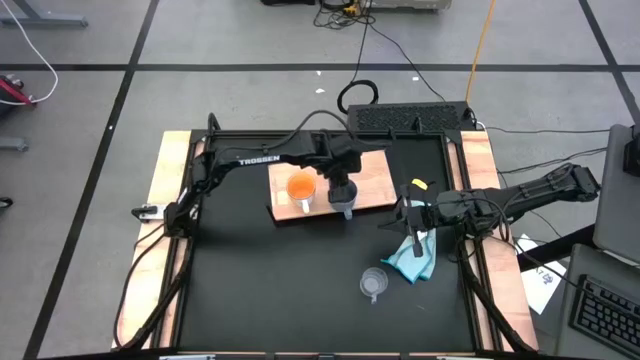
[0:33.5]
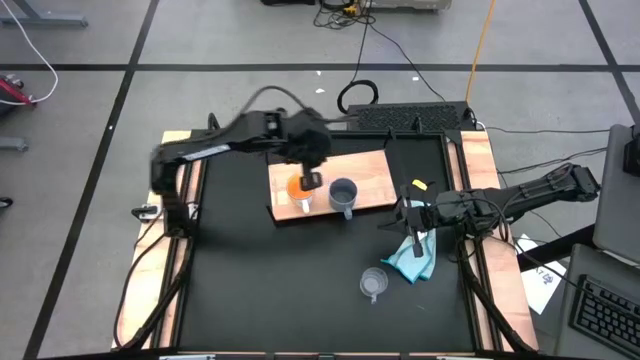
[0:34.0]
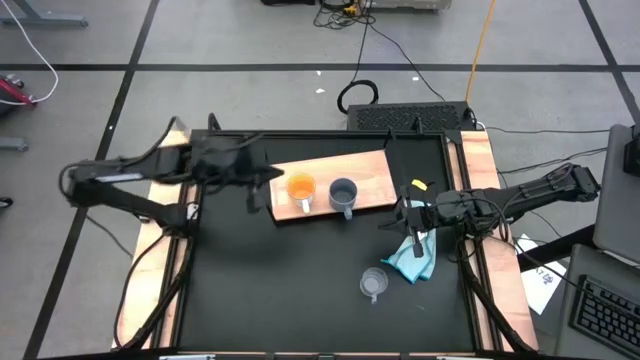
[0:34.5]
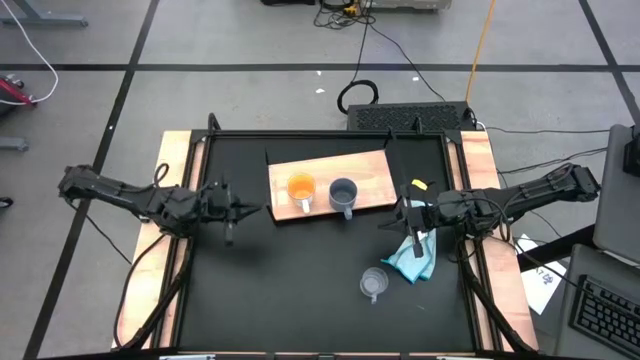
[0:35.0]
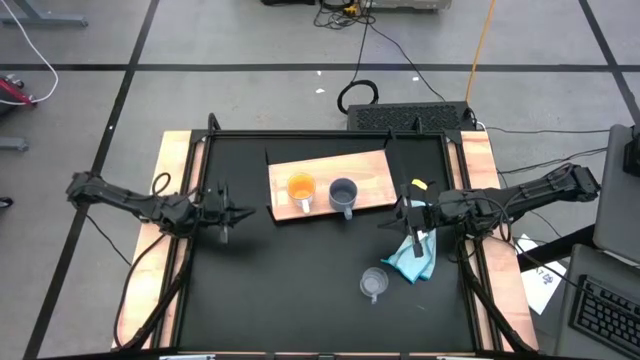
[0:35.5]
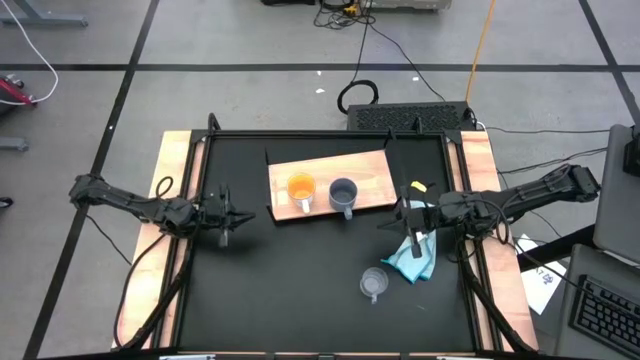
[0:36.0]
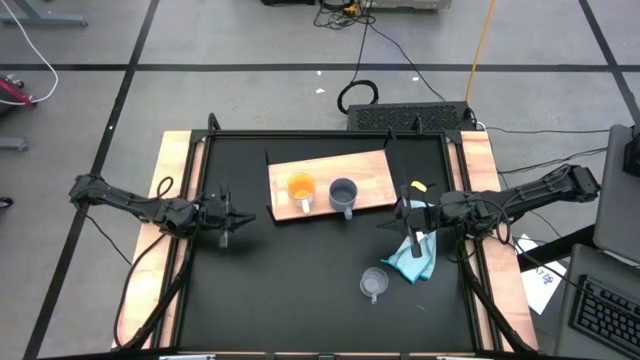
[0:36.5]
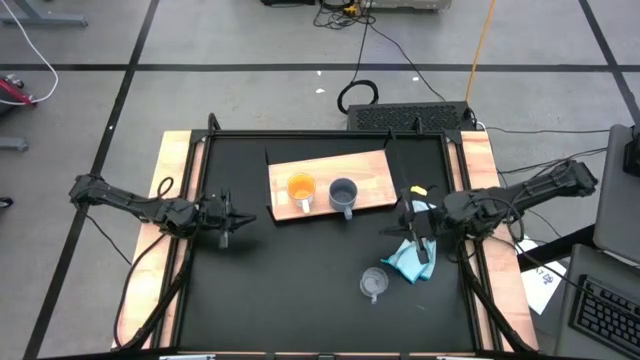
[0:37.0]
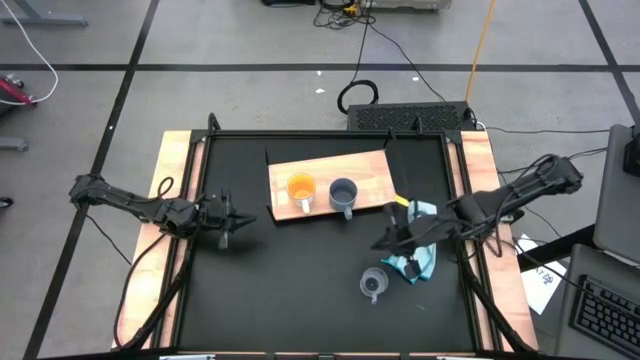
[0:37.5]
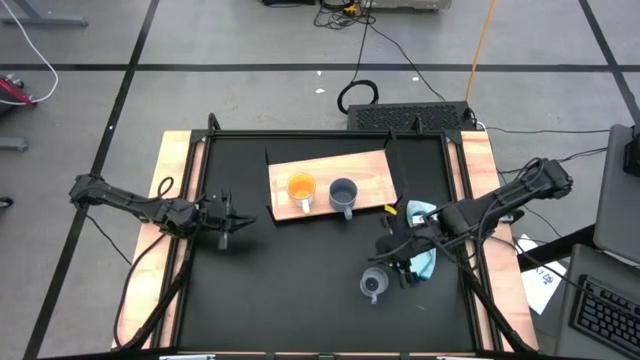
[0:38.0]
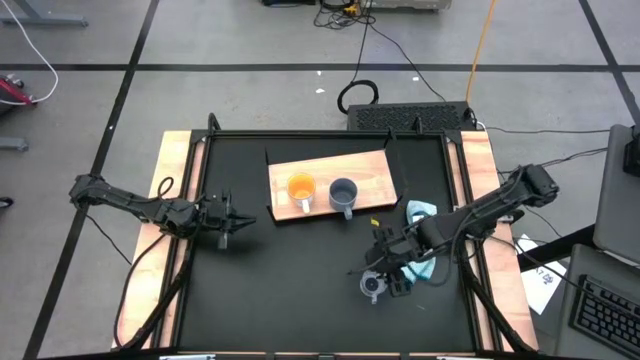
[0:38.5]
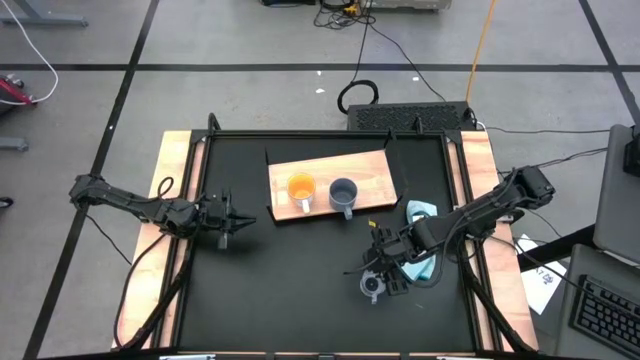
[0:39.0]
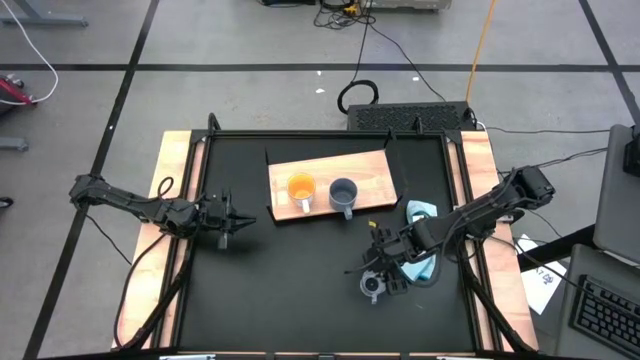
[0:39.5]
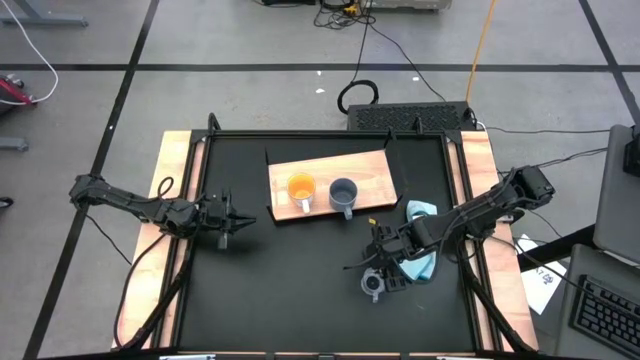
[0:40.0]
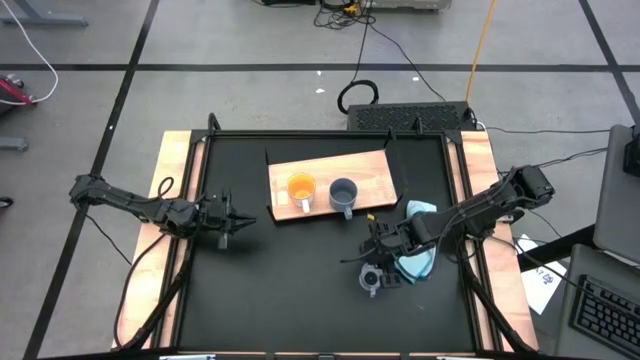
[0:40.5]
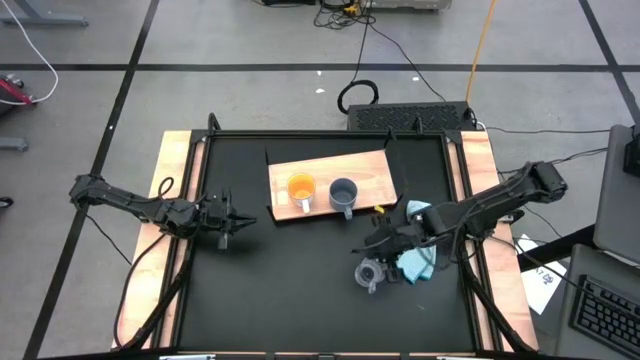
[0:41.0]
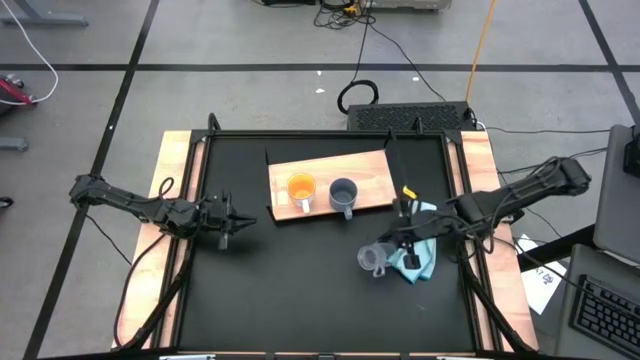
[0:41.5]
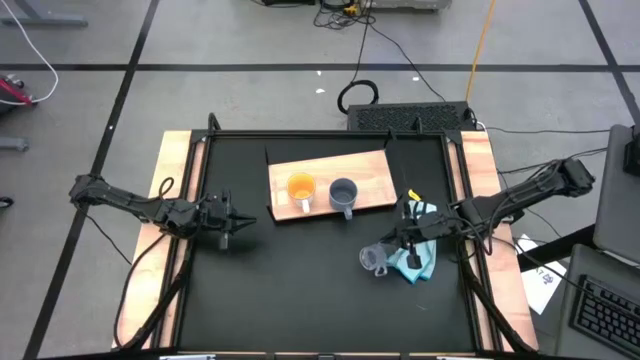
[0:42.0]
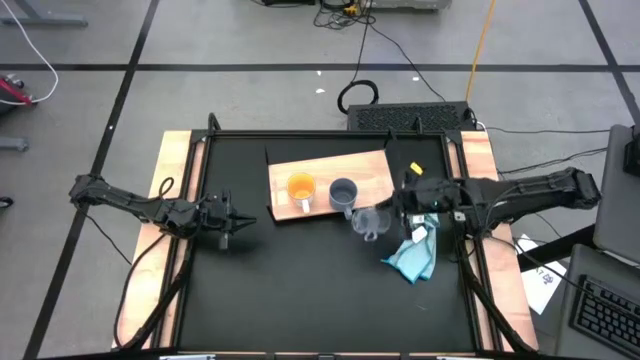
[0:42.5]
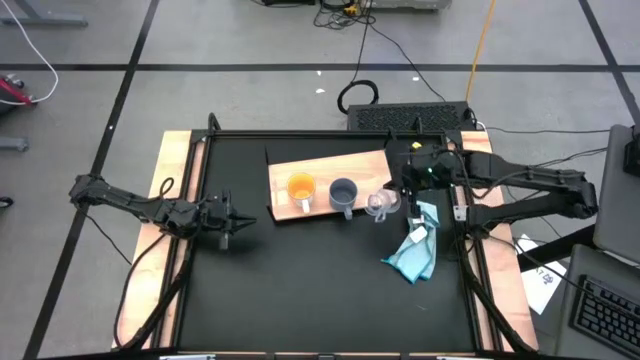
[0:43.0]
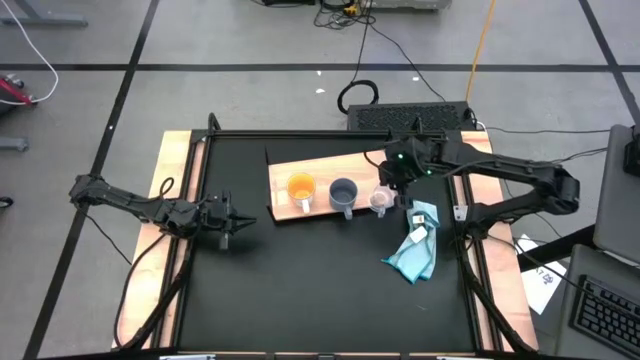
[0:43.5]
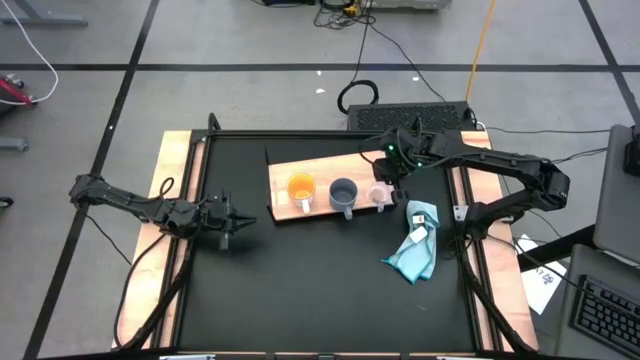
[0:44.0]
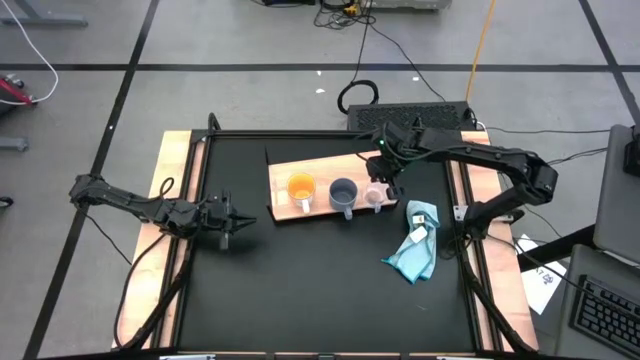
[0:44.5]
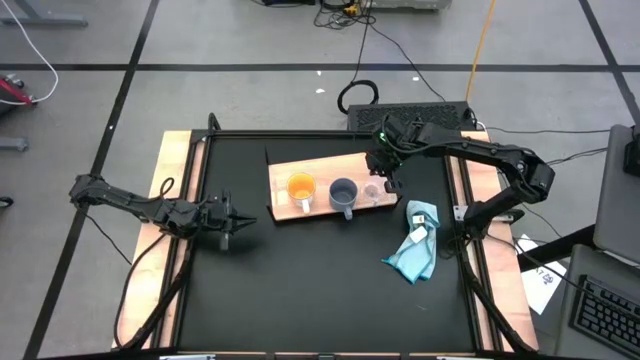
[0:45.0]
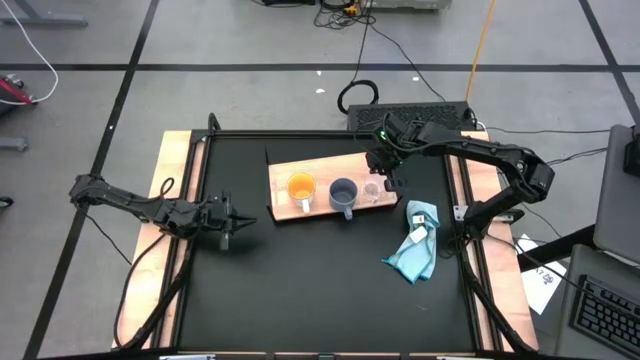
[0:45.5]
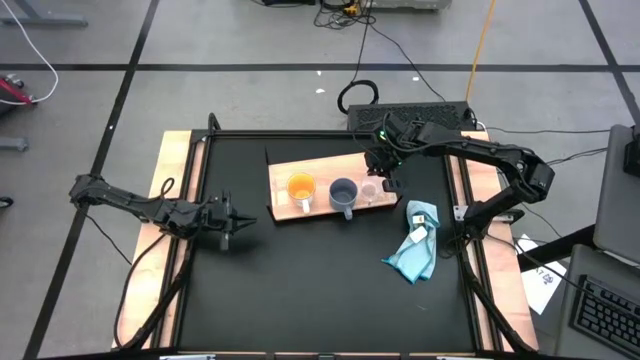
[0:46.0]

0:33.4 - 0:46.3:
Task: Stack small to large cups/mugs on shelf
Put the transparent mug on the shelf

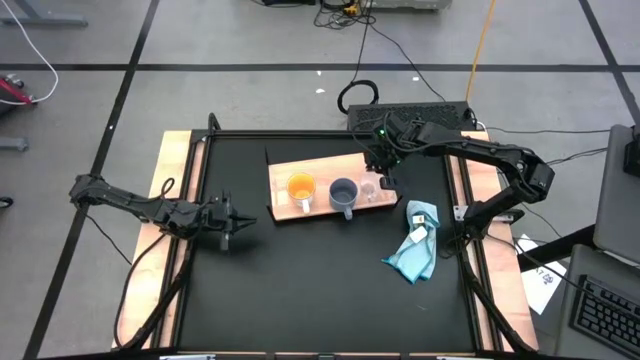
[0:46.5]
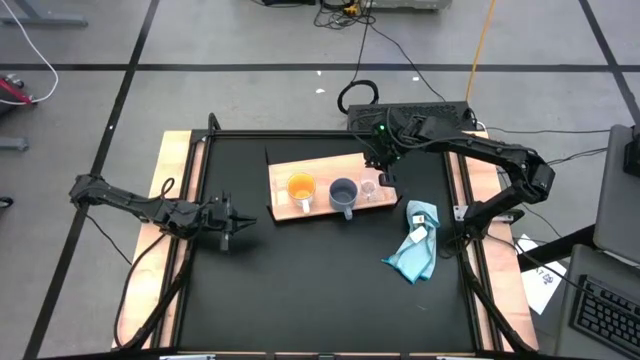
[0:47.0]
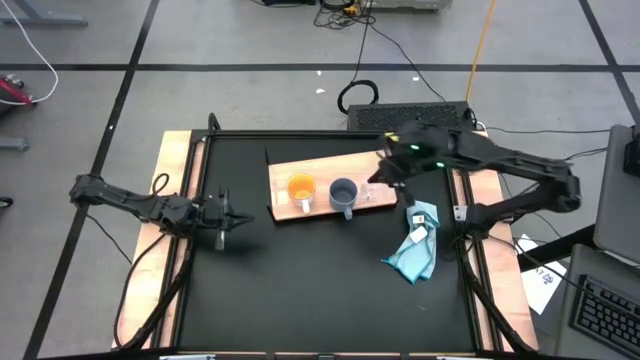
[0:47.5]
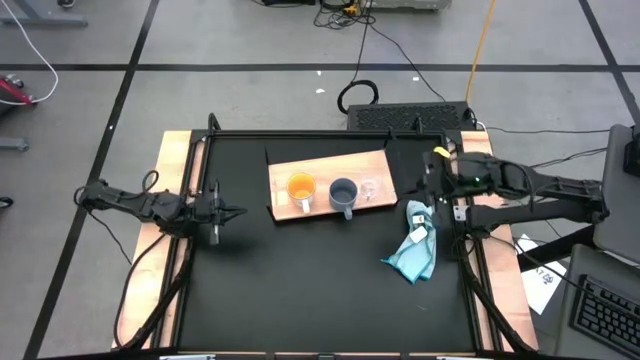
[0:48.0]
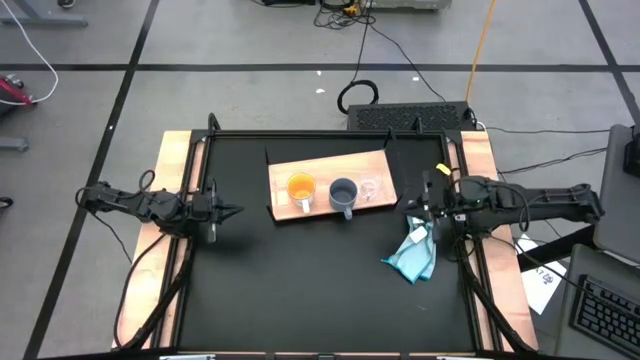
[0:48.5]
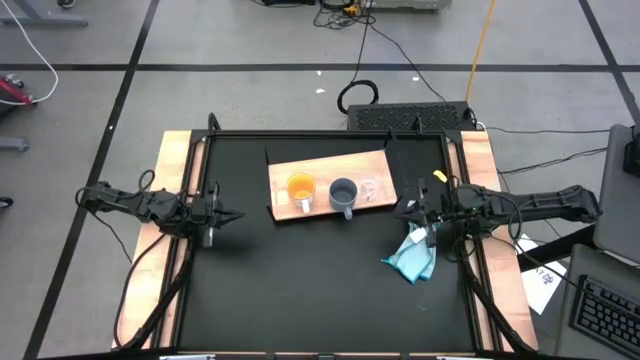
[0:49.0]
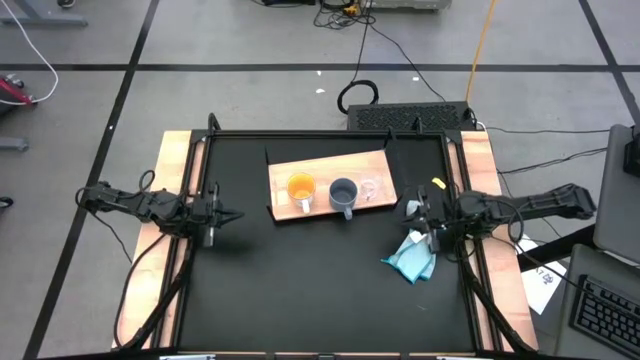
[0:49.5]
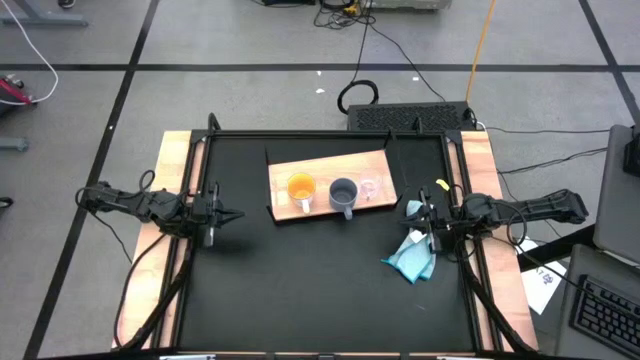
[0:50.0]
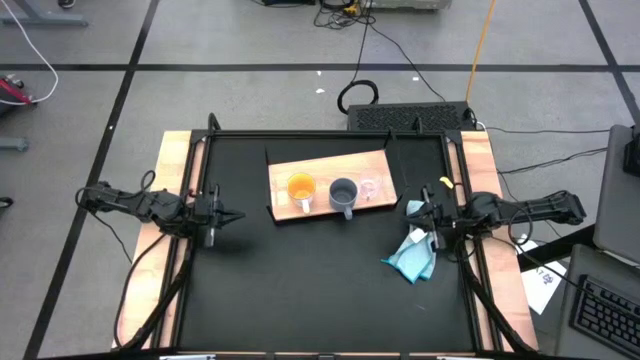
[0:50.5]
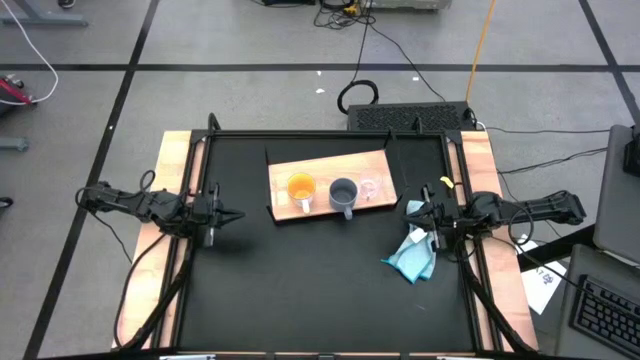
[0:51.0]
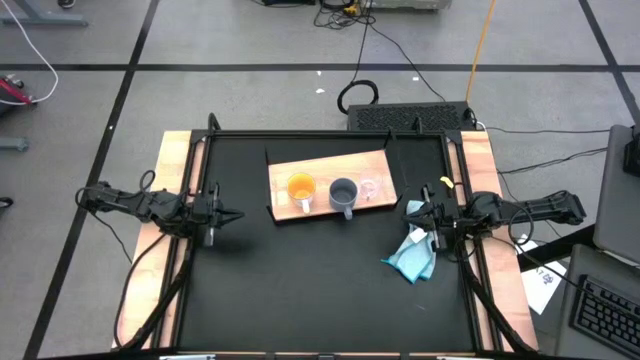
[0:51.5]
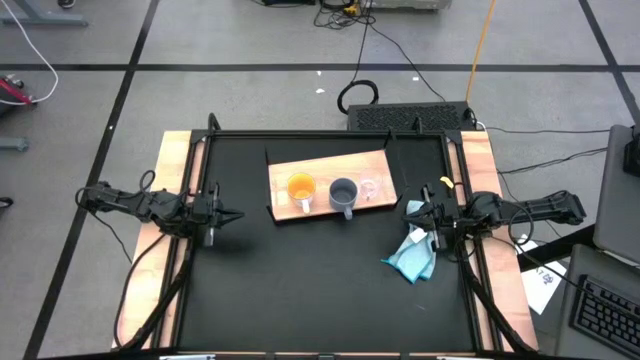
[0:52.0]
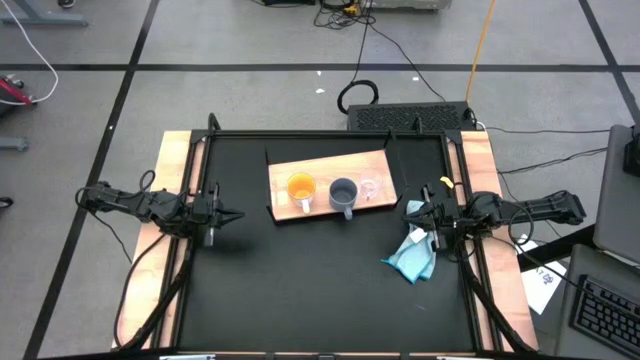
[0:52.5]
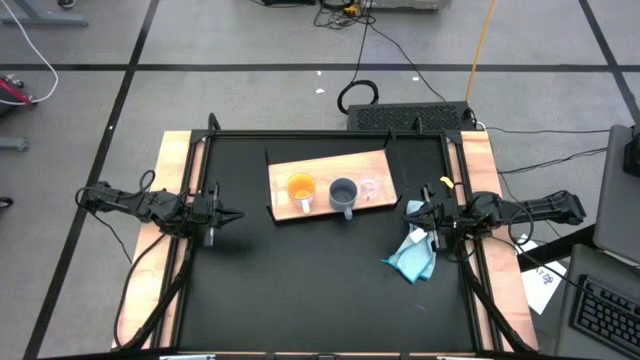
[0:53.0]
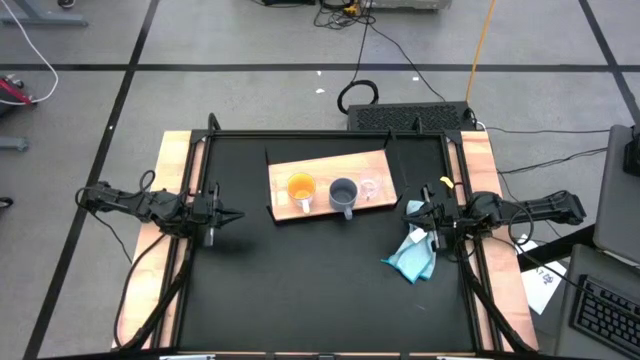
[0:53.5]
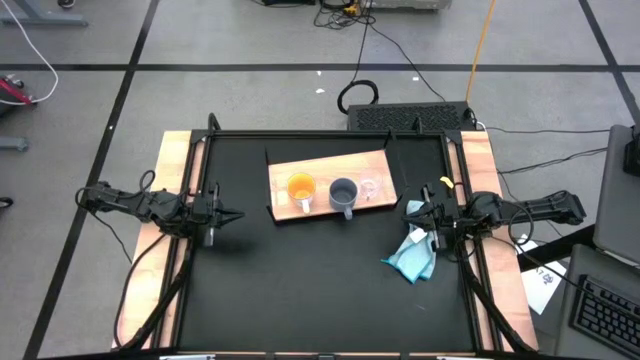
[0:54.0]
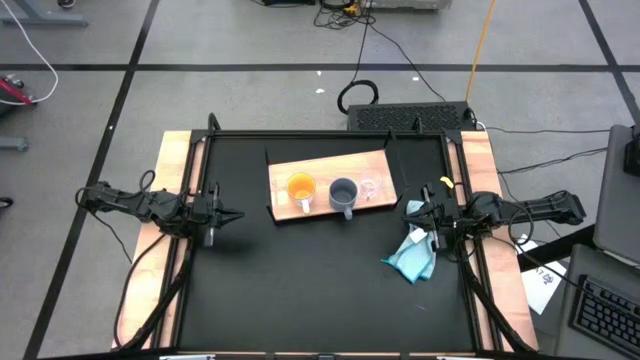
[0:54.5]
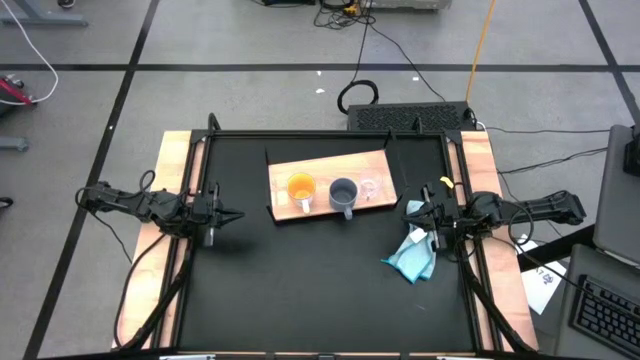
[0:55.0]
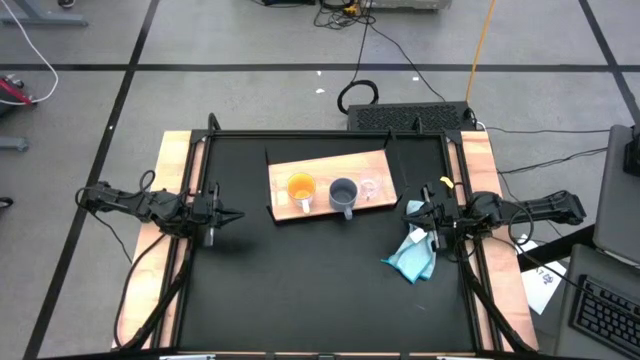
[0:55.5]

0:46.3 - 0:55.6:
Return to Home Position
